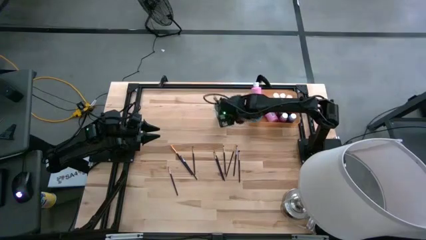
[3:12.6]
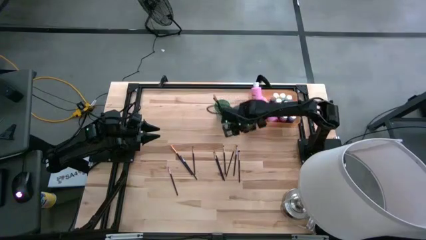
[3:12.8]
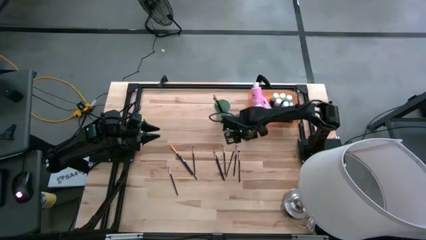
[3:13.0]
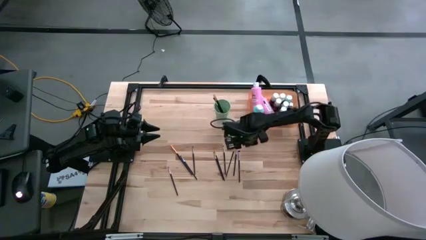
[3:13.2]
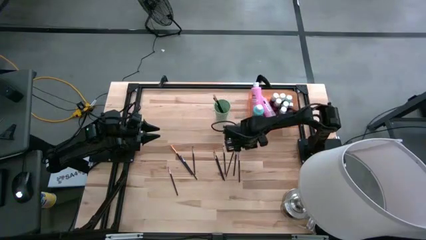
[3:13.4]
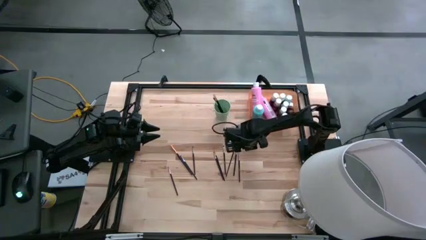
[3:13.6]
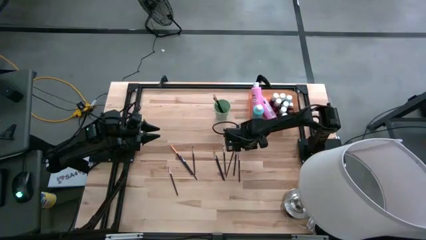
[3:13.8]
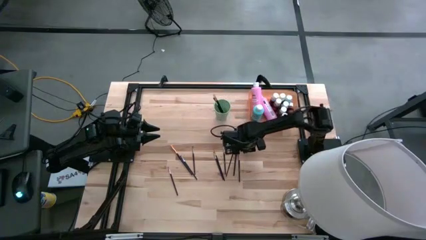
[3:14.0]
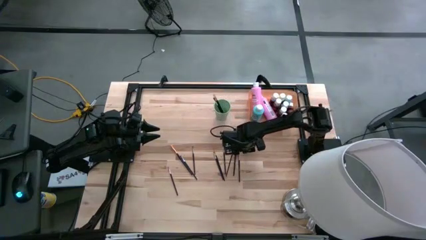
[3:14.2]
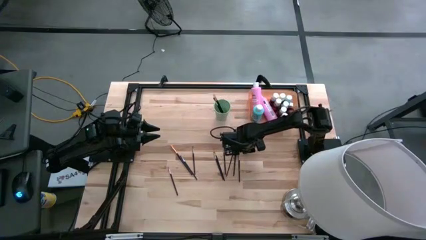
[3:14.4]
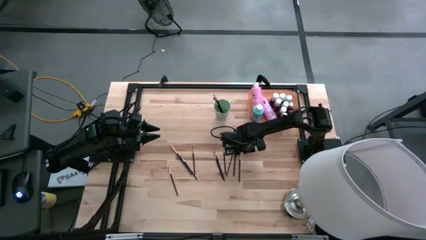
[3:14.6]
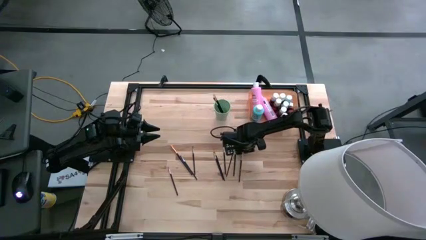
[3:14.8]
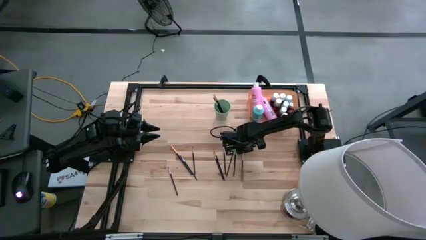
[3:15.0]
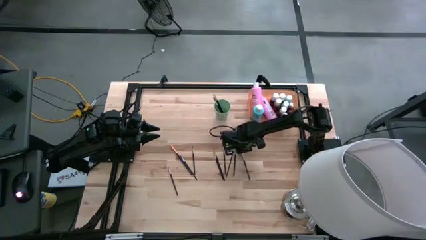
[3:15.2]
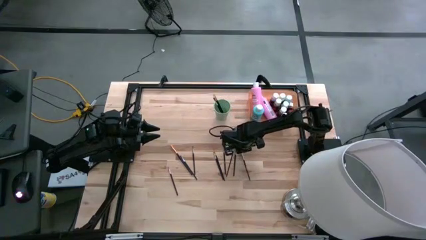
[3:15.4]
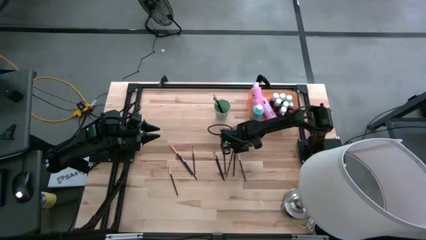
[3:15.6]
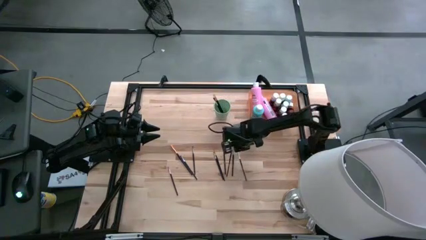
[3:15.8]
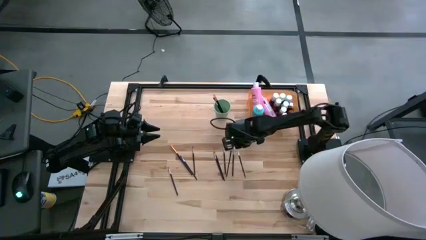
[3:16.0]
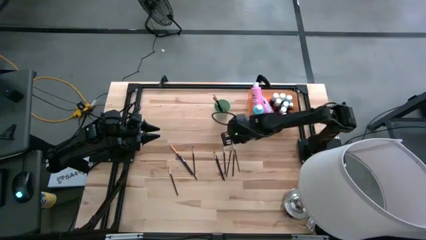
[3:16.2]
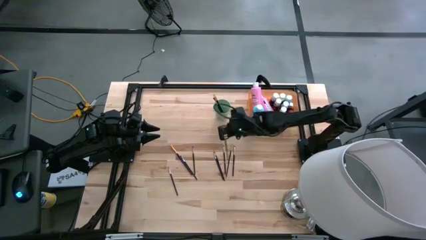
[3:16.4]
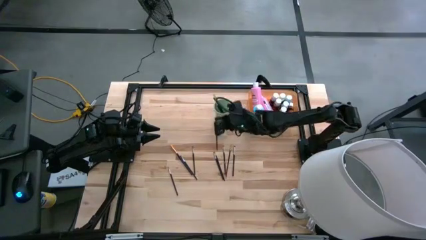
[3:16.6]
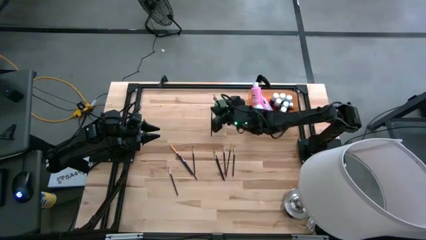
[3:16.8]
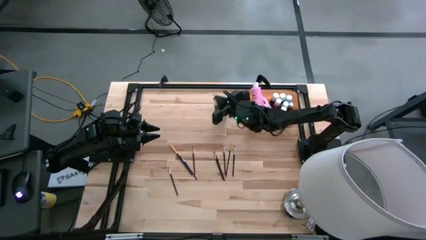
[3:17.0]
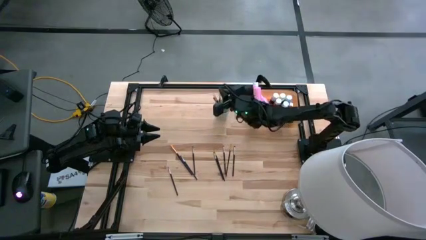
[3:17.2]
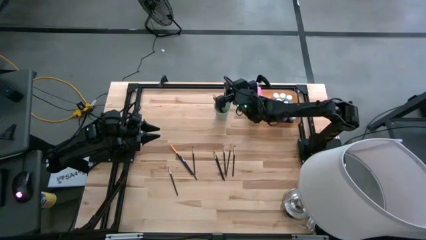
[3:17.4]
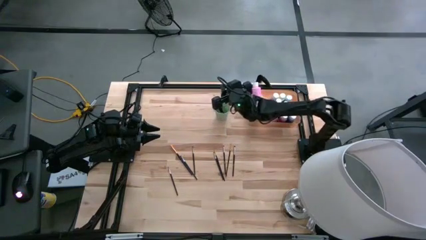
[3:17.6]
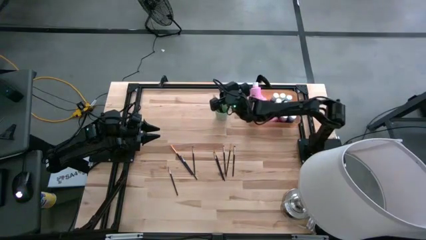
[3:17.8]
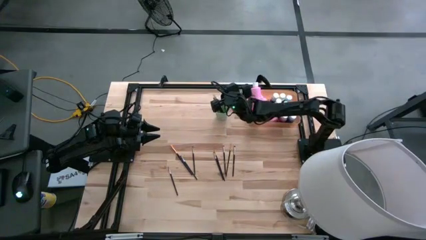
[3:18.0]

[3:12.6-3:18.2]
Task: Pick & Place Paint Supplies
Put the silver paintbrush into the green cup

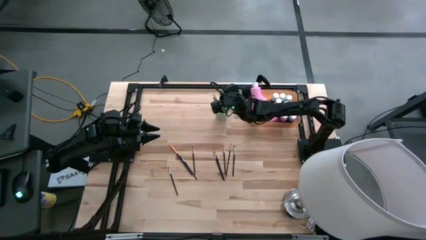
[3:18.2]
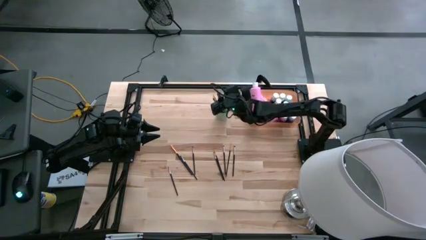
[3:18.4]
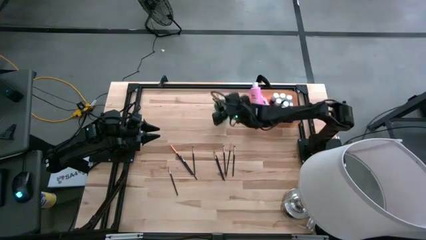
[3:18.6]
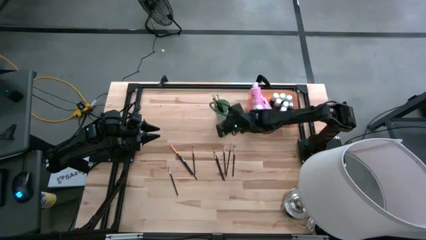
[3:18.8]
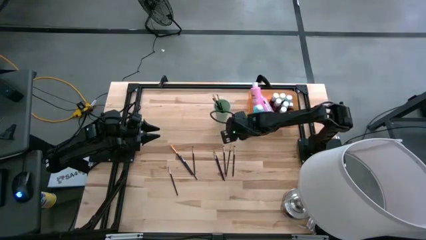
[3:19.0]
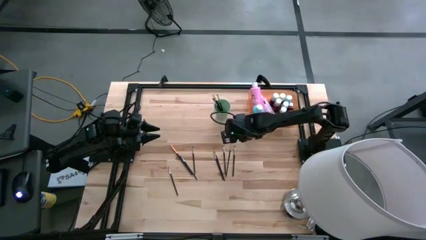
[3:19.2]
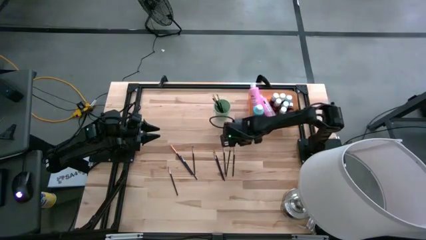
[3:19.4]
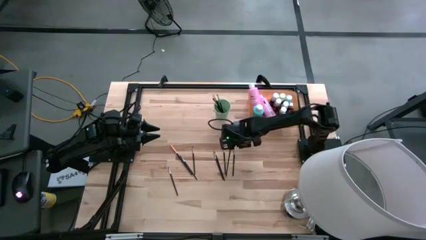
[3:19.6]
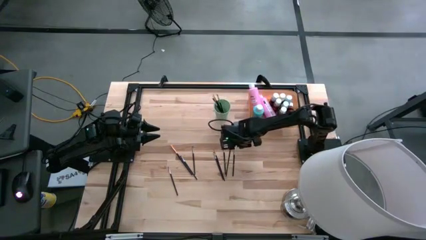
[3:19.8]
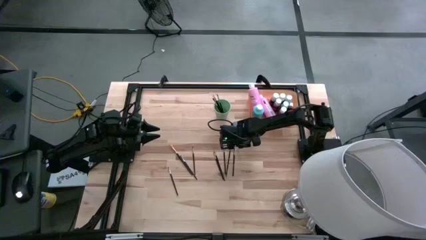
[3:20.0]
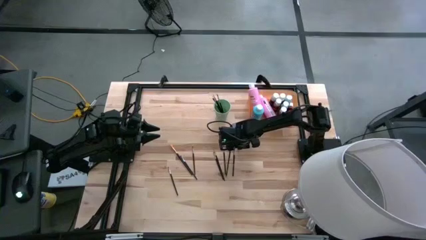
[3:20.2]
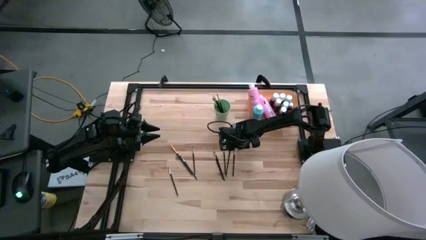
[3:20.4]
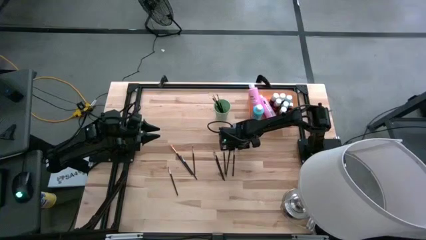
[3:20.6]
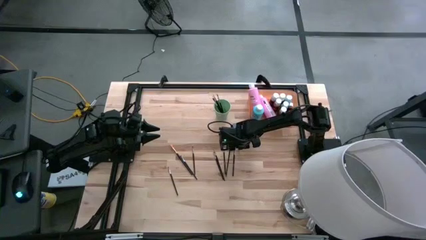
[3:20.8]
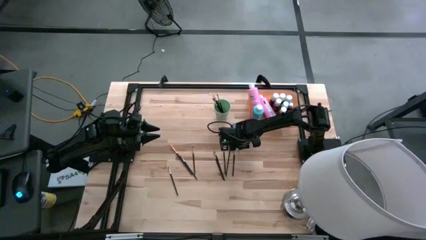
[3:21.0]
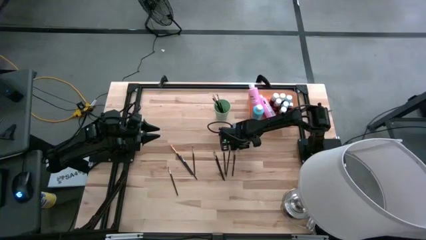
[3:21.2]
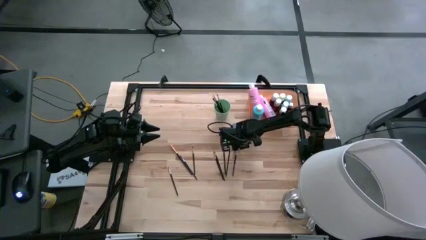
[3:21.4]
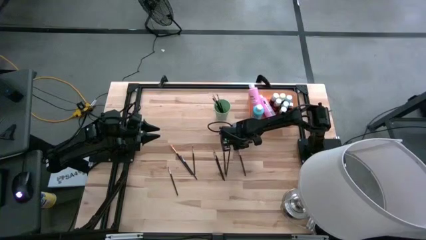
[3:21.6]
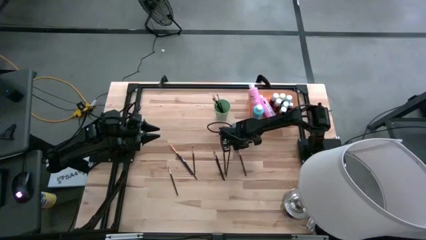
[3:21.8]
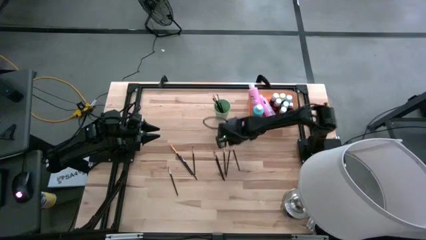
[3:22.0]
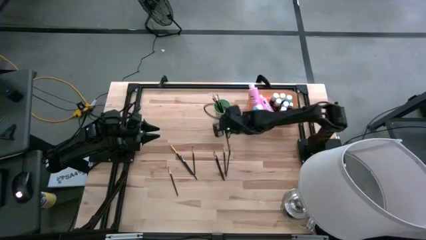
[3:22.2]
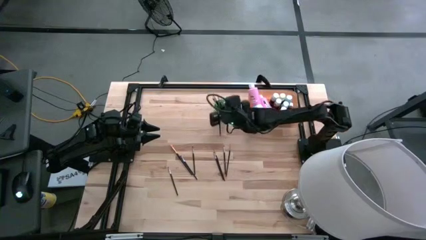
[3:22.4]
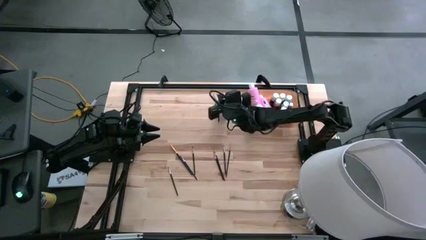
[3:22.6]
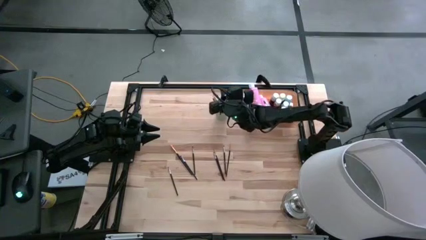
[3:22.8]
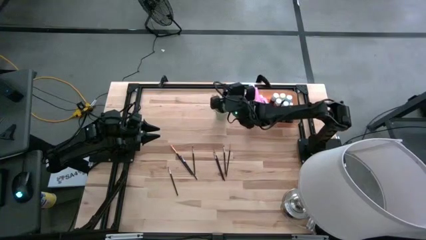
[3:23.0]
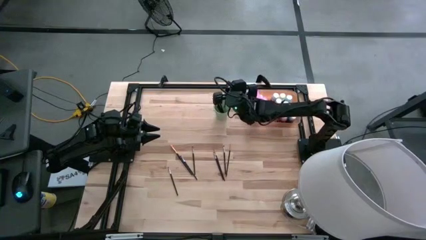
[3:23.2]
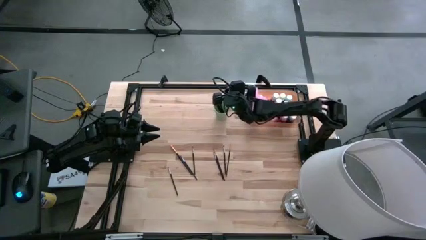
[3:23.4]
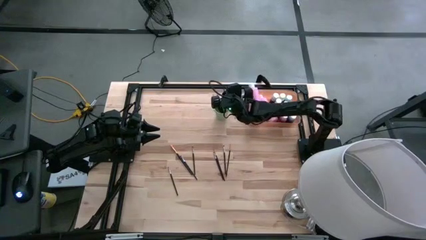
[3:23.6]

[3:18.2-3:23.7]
Put the silver paintbrush into the green cup

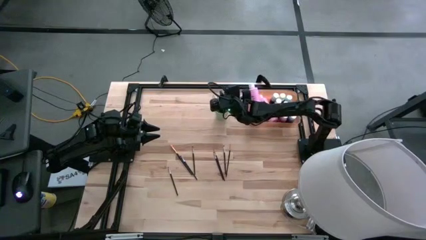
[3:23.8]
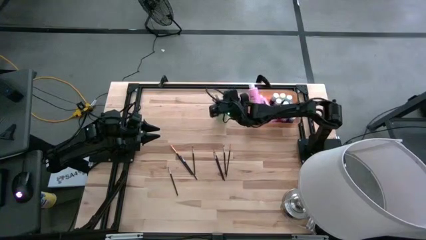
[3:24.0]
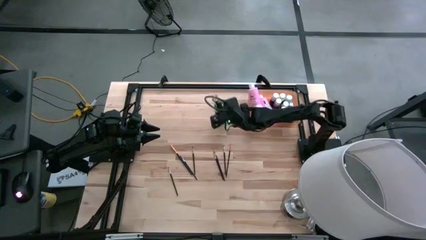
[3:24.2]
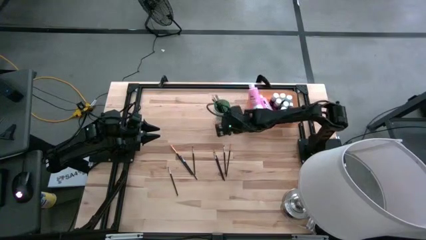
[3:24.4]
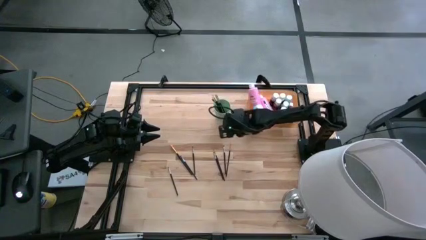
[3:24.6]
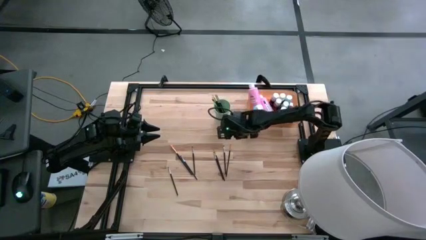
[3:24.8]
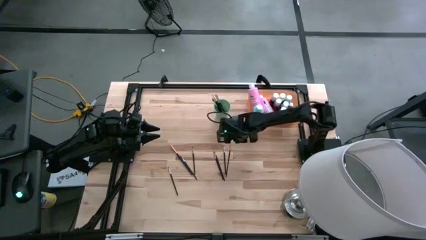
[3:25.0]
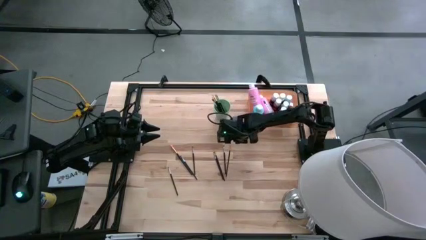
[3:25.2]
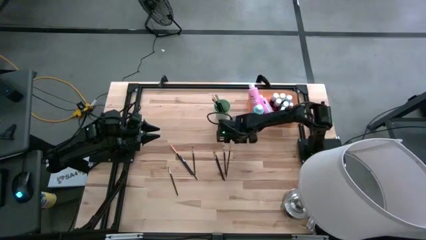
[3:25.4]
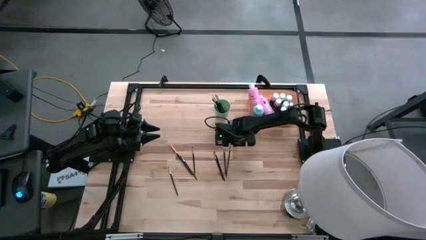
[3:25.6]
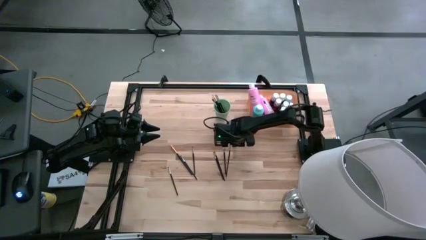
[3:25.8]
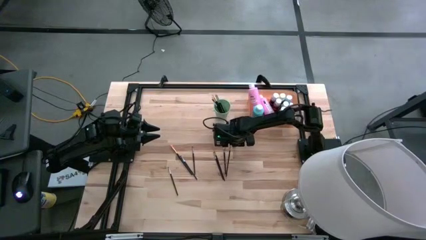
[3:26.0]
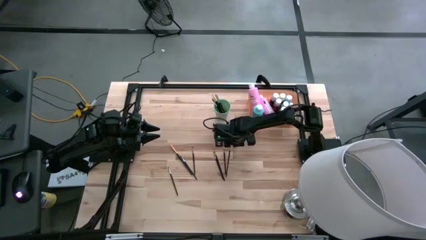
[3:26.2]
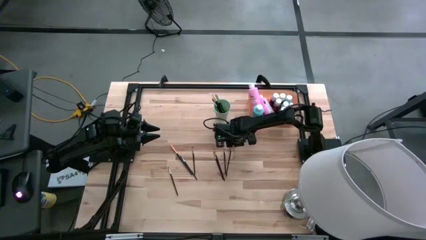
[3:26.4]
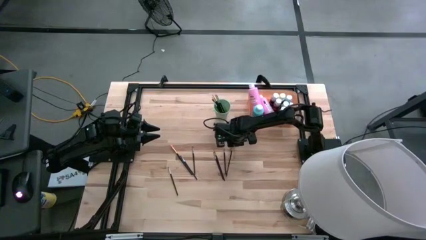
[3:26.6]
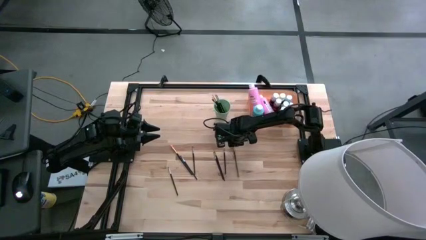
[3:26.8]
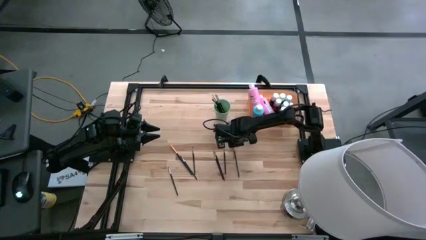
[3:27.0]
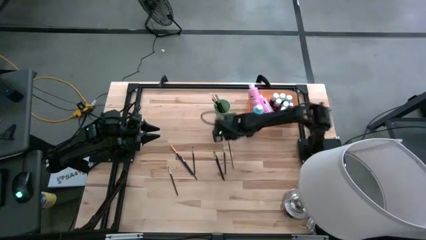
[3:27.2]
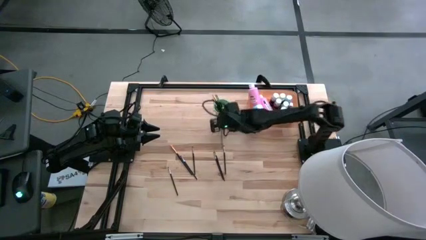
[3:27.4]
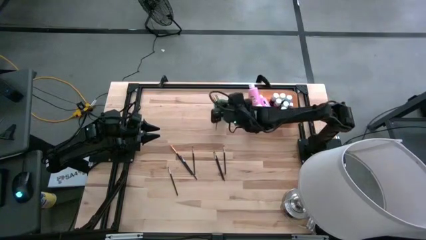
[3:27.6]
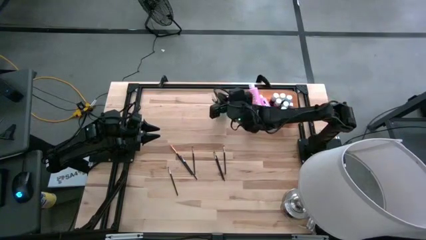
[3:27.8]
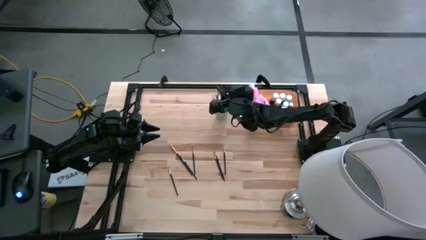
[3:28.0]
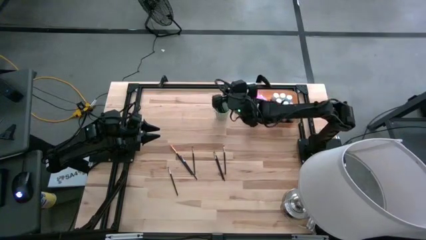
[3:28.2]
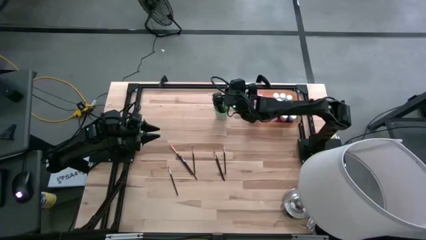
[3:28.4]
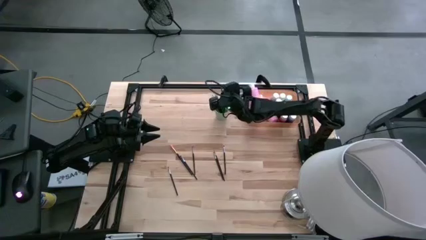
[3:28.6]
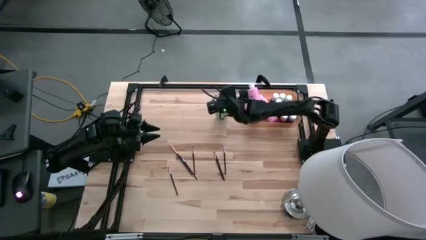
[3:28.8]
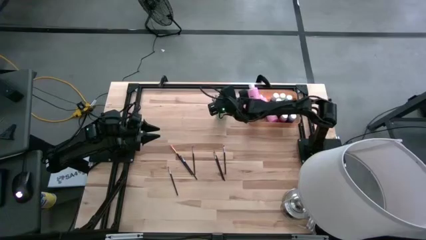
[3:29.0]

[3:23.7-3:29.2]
Put the right gold paintbrush into the green cup
